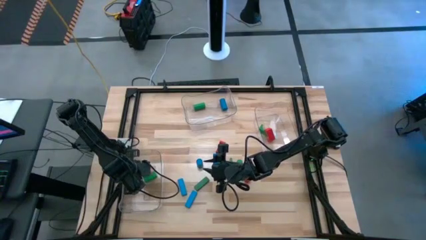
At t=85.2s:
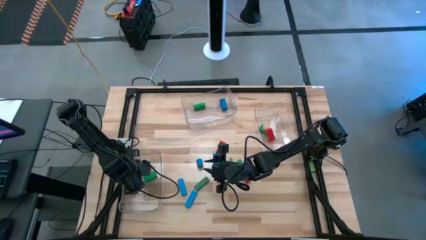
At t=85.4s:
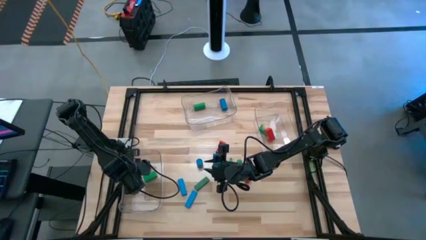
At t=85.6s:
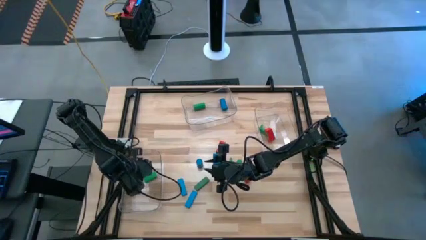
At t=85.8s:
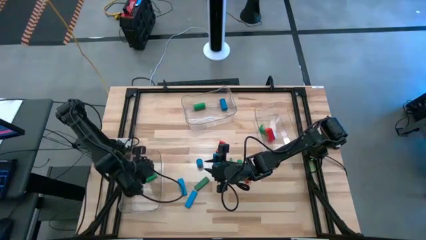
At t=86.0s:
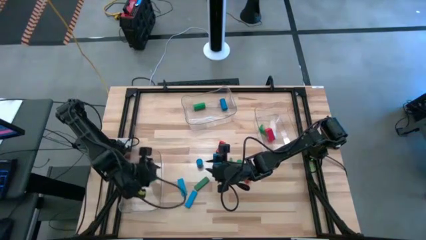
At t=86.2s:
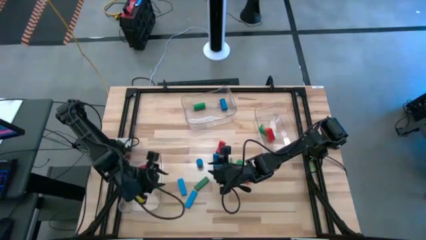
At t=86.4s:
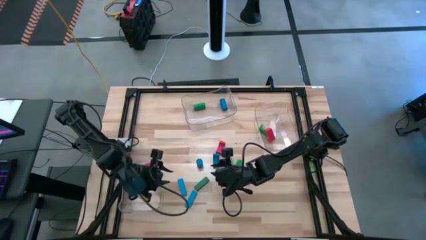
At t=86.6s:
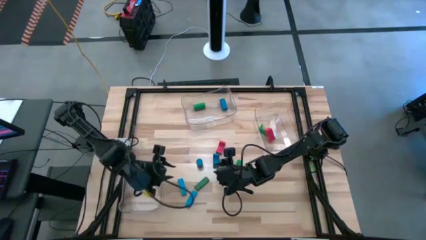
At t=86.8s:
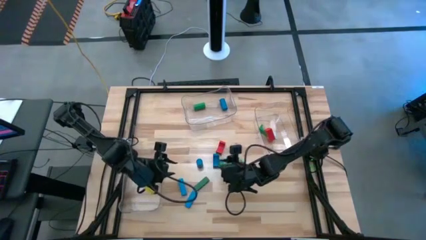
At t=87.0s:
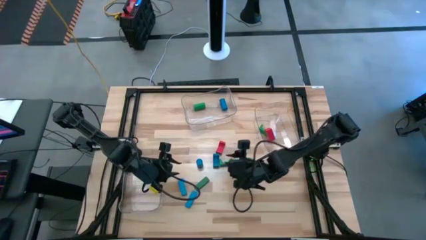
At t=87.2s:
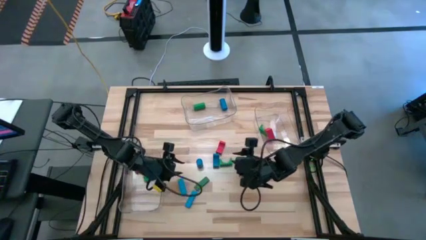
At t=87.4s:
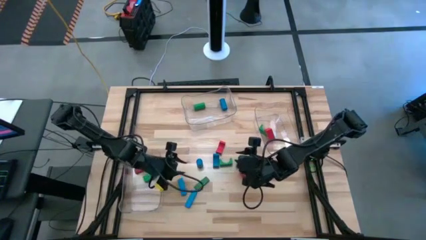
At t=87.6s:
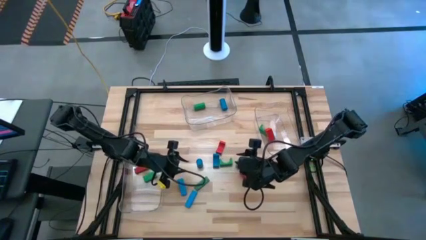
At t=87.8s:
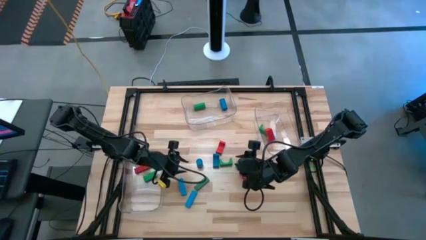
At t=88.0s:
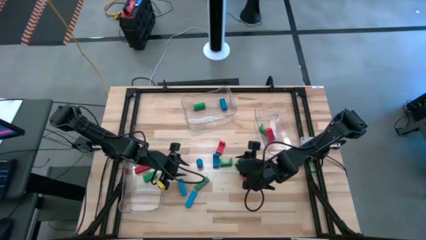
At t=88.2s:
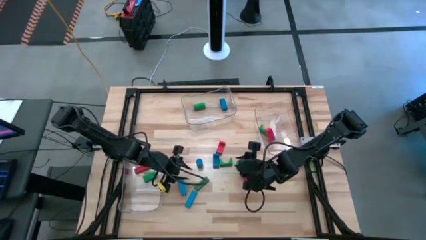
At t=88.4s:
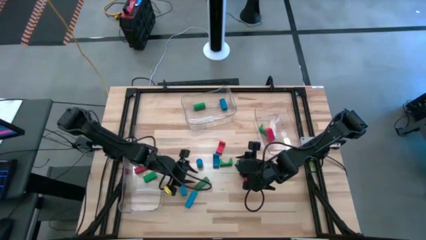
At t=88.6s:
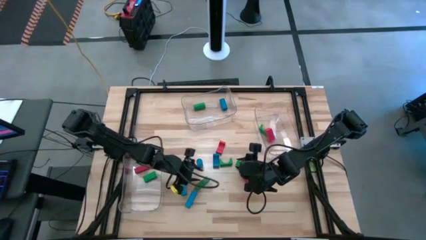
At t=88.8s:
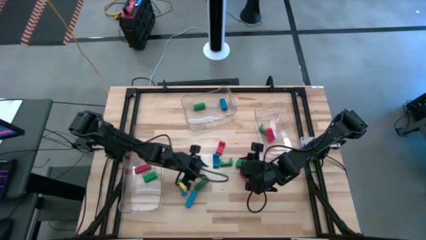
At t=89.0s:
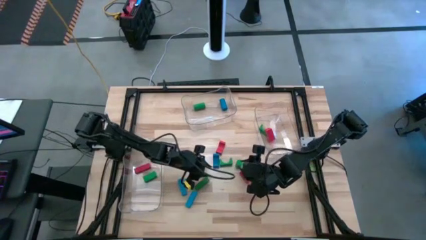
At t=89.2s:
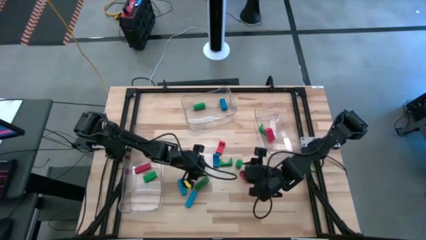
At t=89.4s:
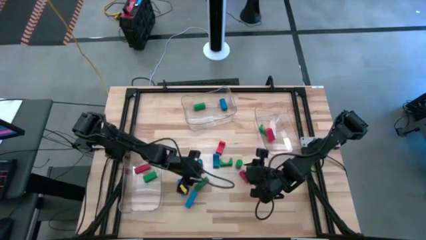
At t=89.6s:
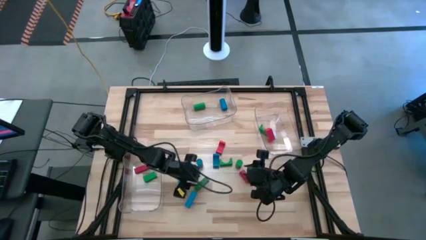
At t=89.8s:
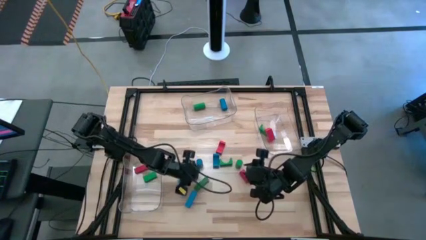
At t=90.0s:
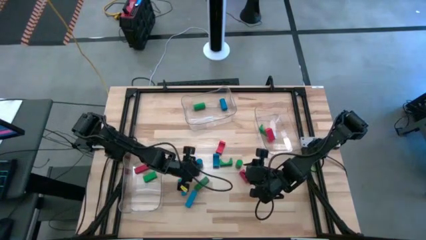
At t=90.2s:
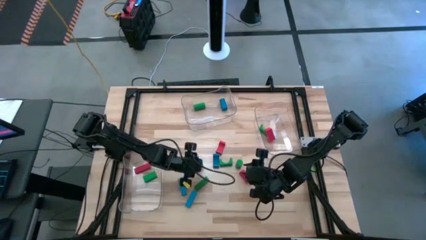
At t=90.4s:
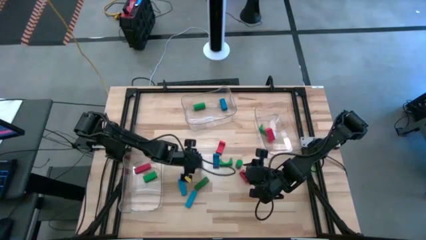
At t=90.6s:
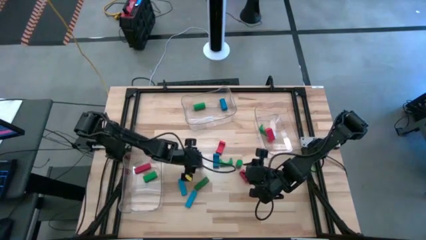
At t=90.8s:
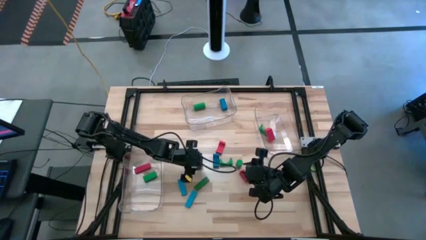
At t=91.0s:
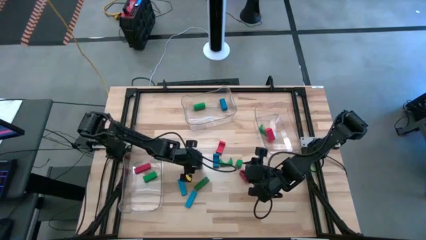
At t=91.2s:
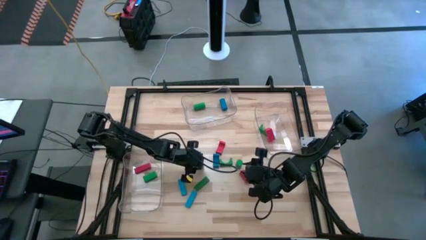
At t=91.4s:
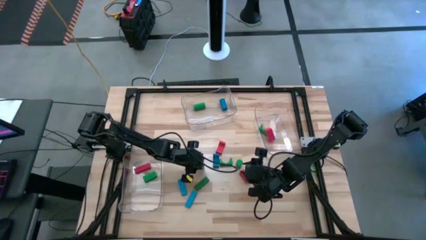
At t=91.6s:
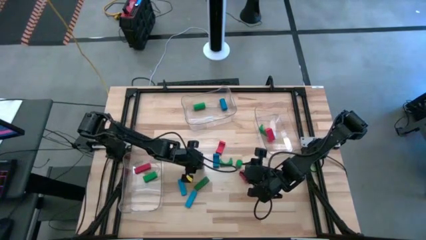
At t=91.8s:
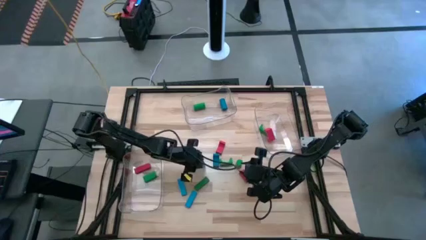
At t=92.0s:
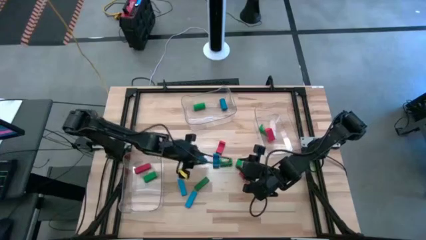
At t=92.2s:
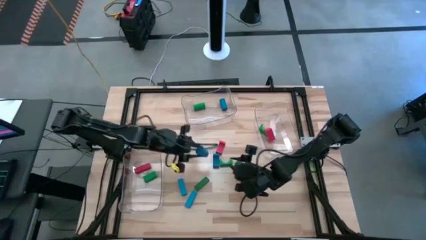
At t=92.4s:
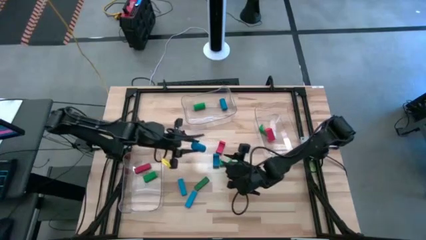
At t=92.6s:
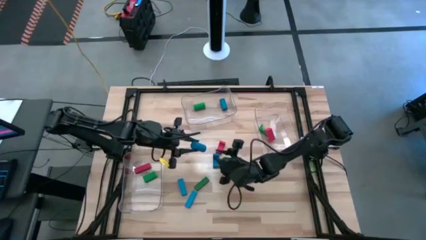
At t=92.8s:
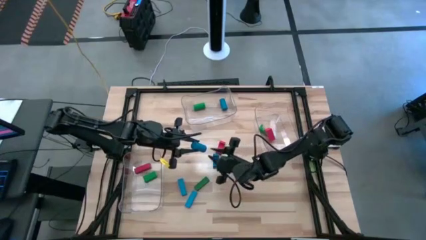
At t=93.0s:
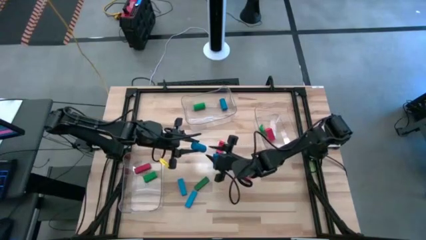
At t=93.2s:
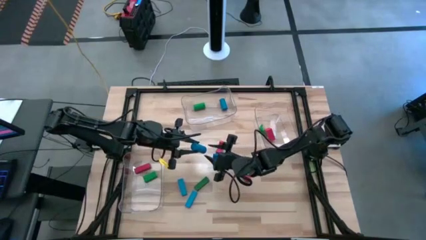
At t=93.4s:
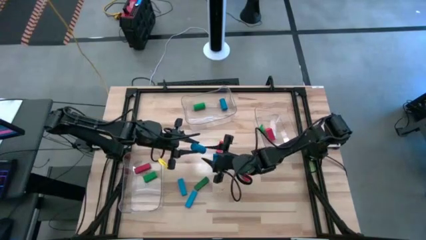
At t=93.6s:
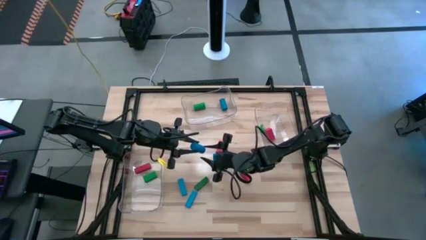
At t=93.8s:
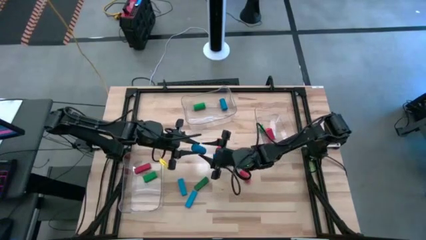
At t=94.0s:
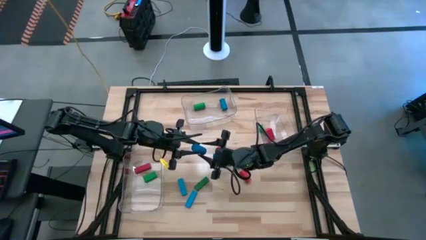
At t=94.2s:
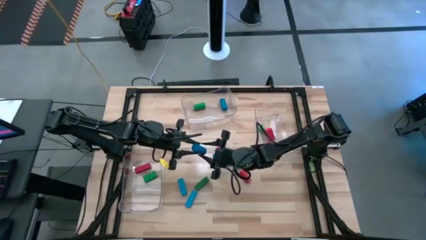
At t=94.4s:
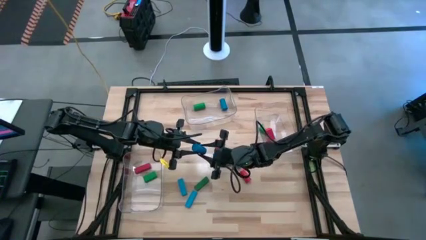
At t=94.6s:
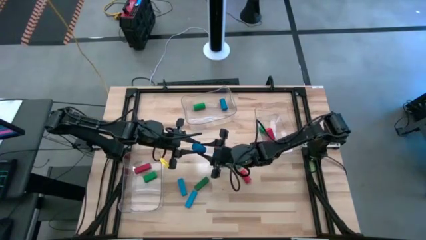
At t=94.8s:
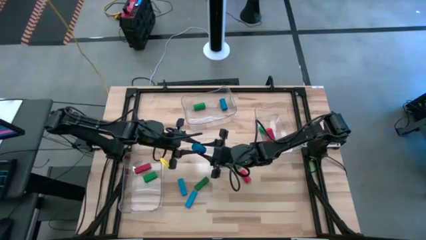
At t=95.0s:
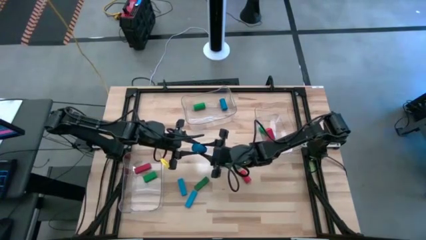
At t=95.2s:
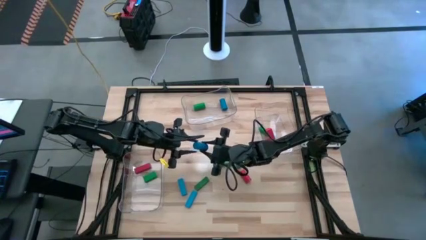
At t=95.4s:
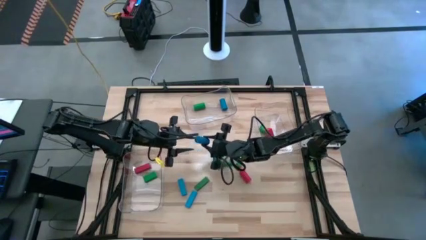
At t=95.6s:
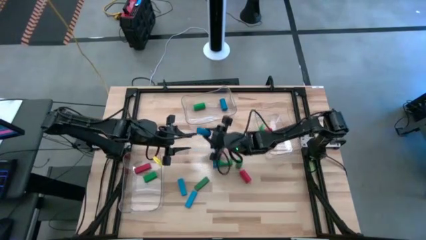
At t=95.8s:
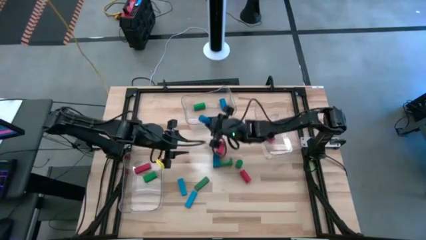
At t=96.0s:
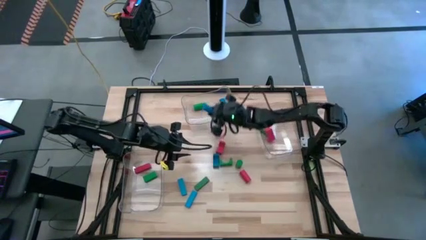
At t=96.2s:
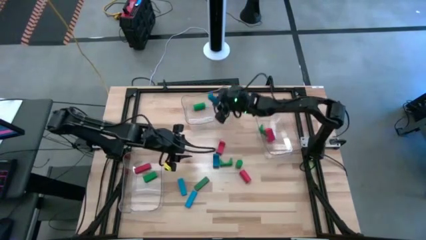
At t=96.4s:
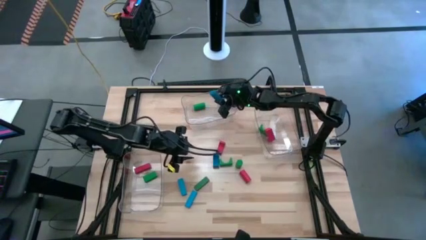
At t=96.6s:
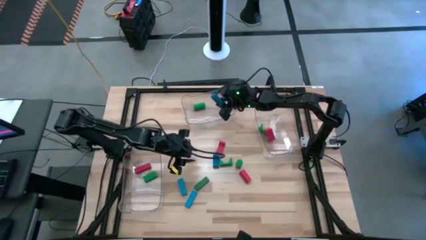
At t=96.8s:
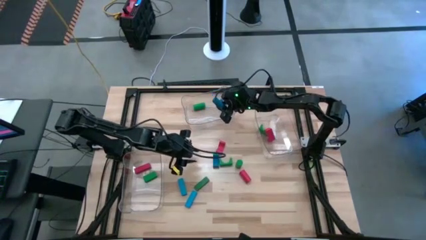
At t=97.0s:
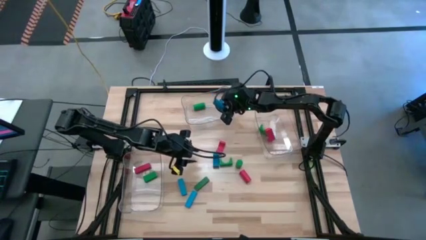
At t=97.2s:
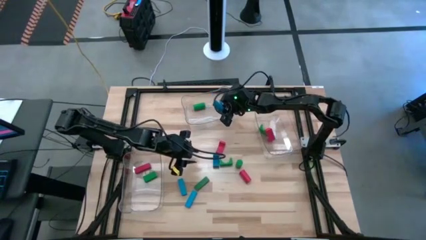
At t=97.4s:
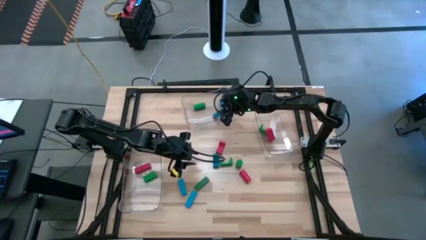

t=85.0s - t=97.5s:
Task: Sort blocks by size
Put the blue cylinder block into the top transparent bin
